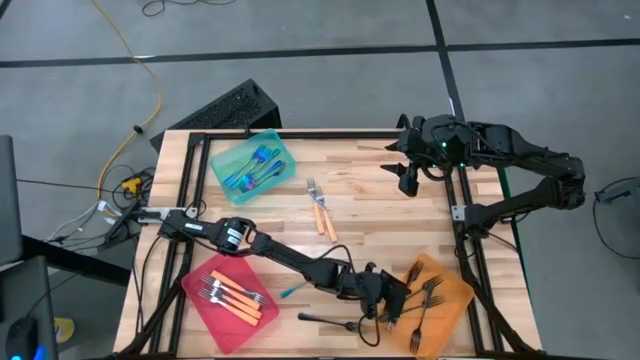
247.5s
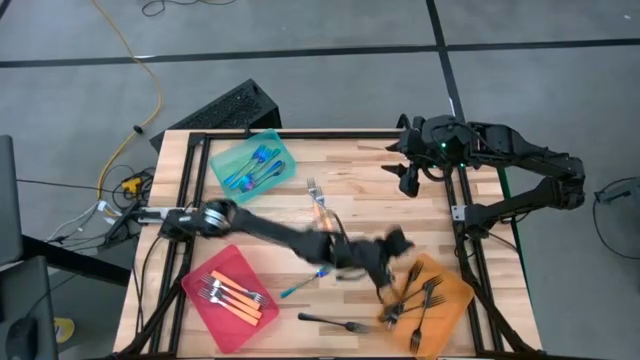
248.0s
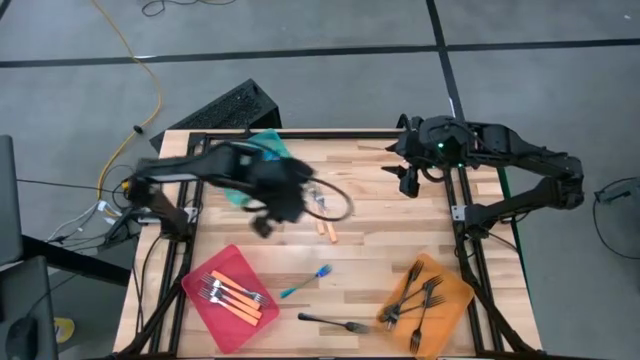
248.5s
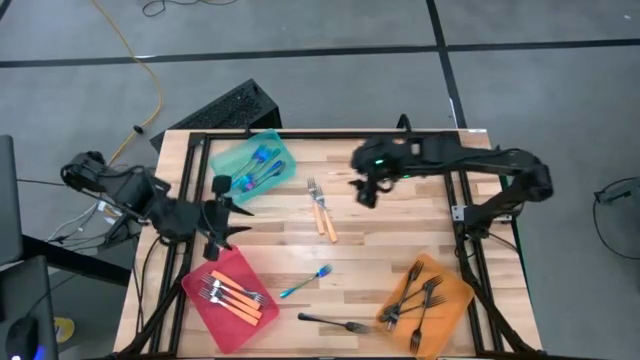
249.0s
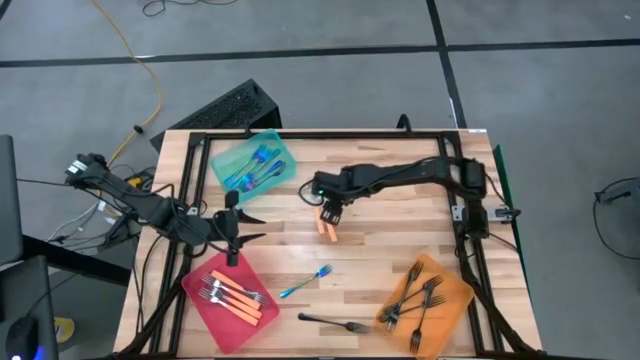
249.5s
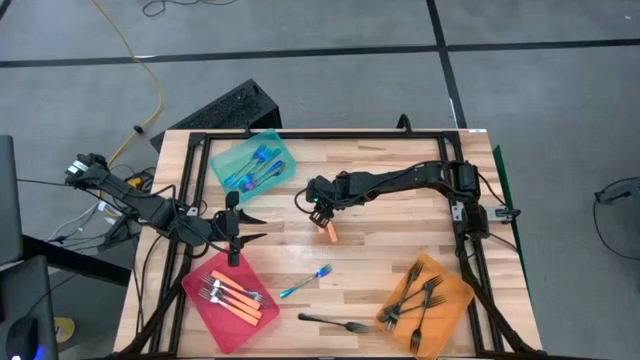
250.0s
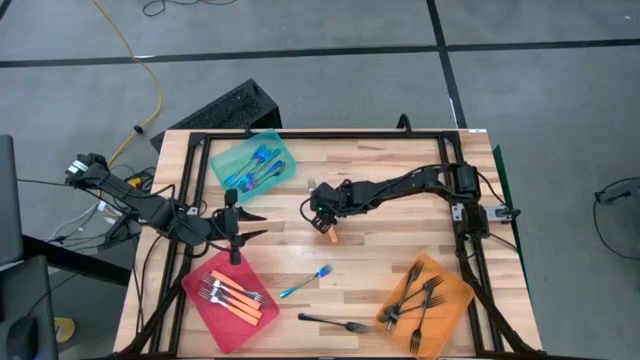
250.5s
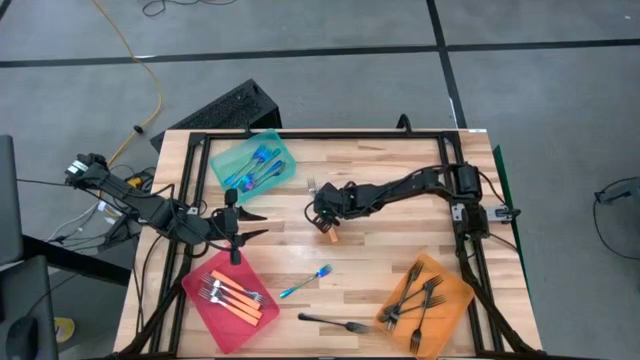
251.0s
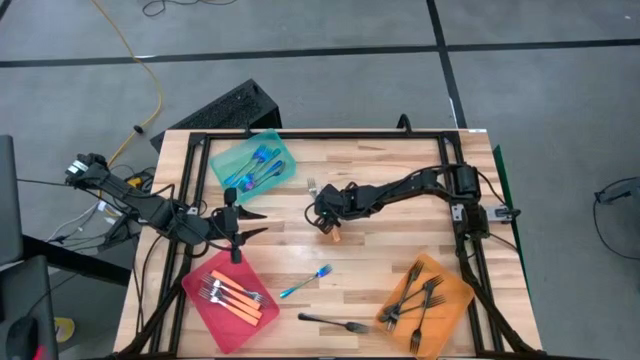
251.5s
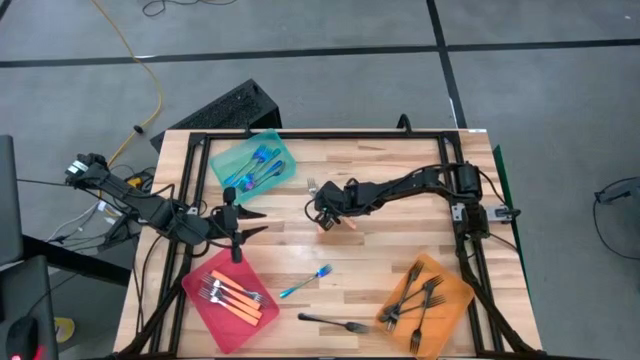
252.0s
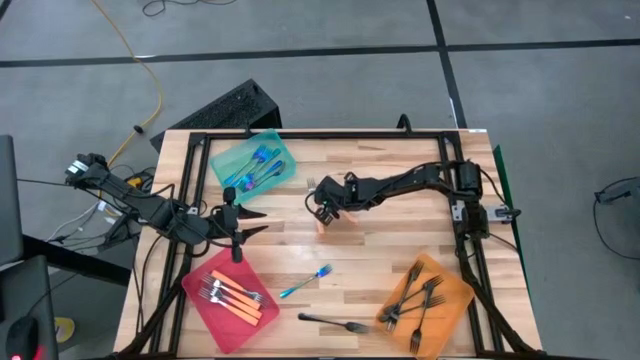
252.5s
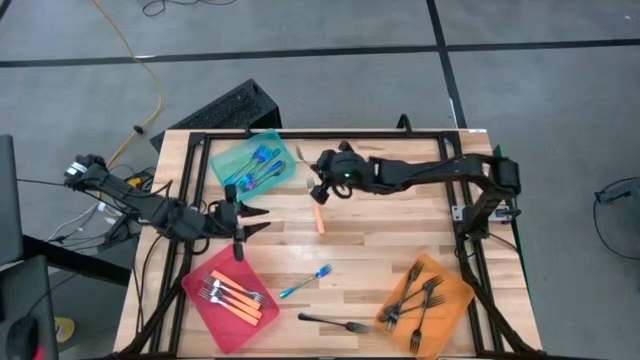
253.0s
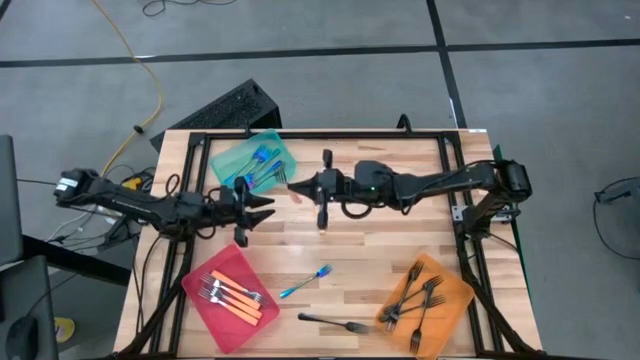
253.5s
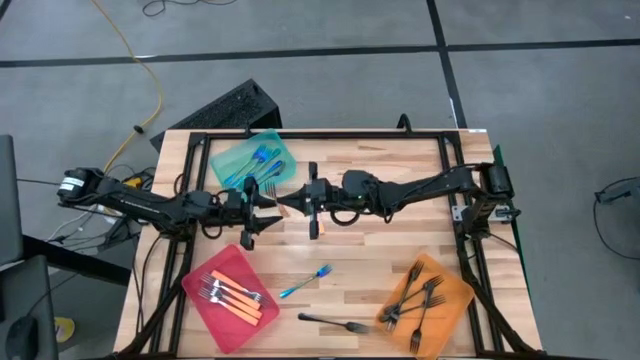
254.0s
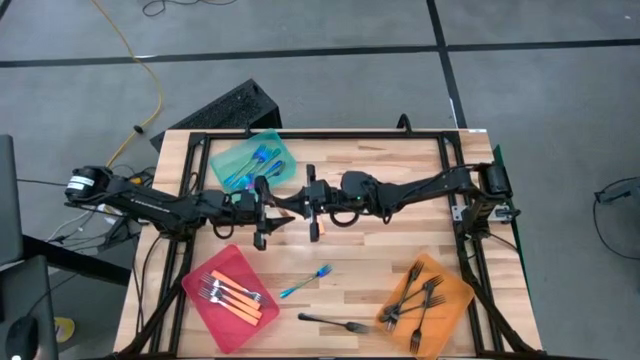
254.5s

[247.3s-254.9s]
Task: Sort silverware by color (type)
Put the orange fork into the red bin

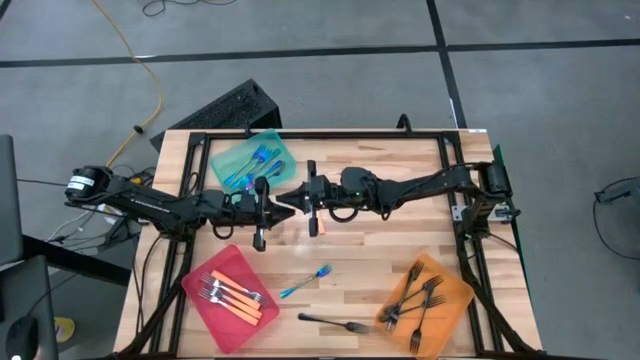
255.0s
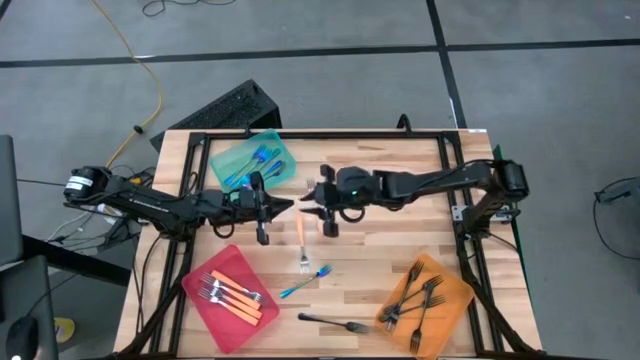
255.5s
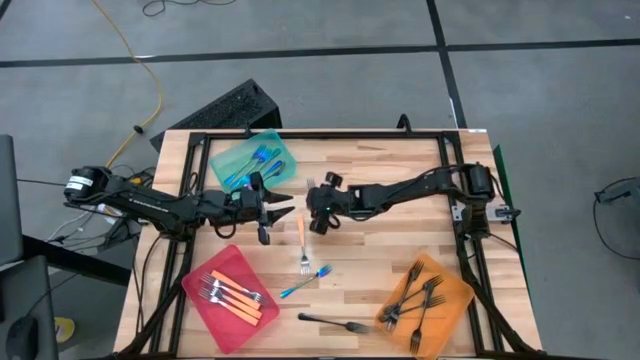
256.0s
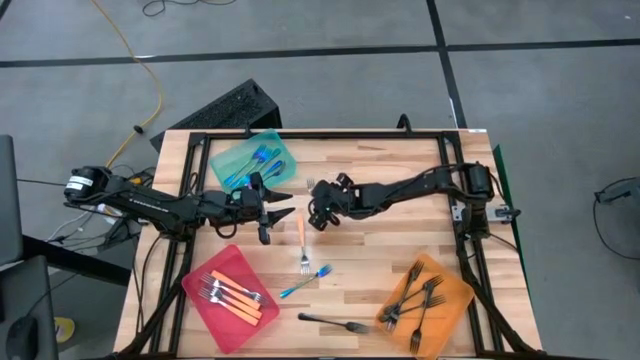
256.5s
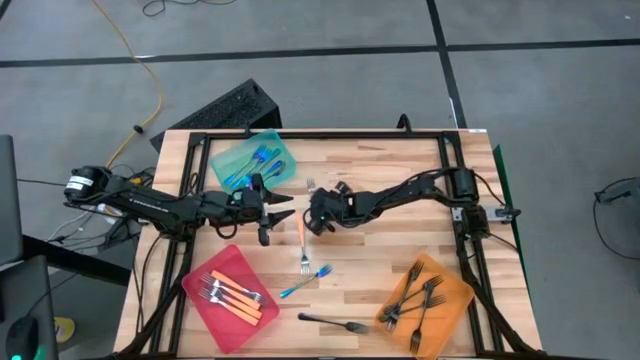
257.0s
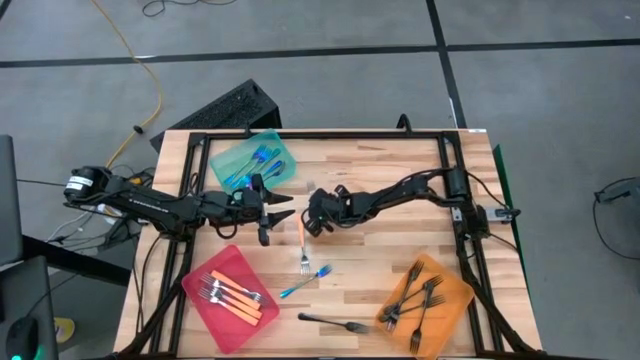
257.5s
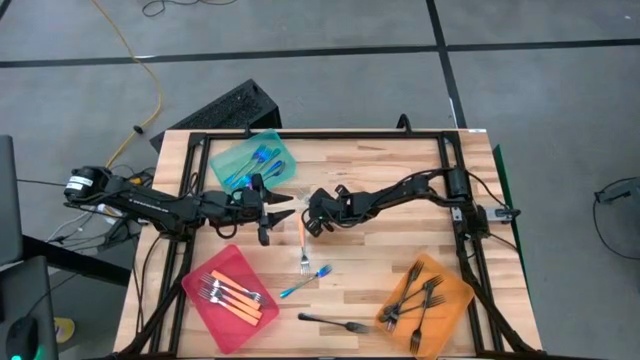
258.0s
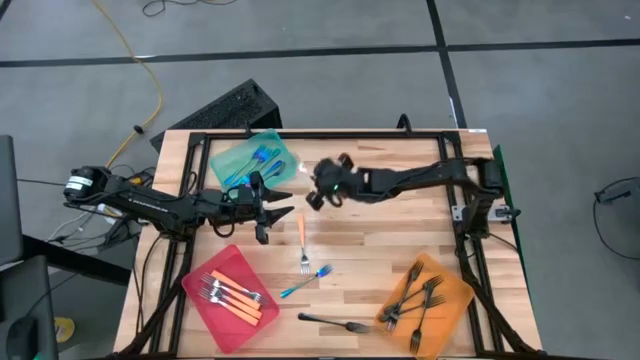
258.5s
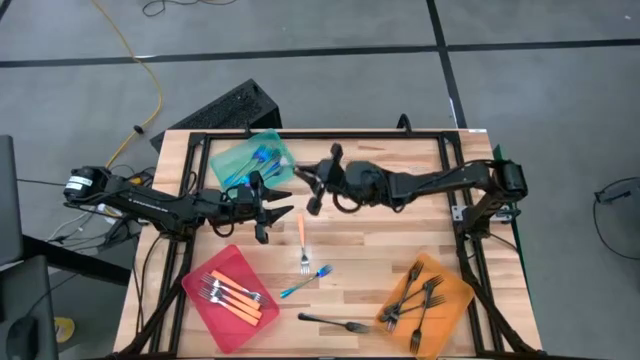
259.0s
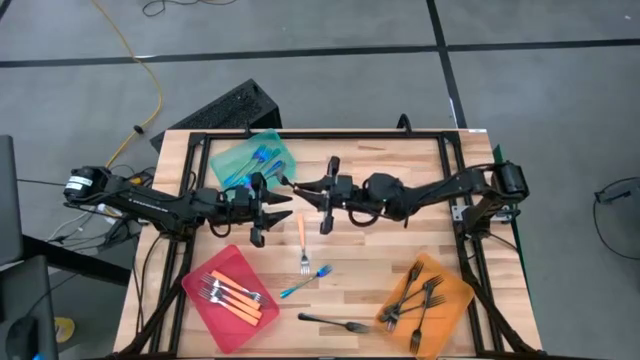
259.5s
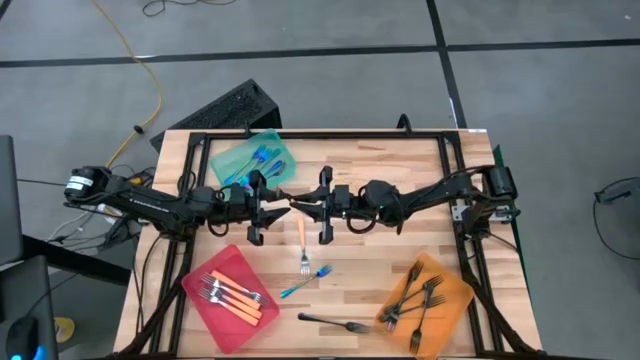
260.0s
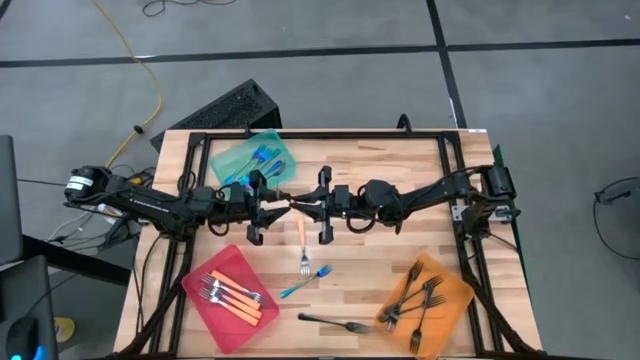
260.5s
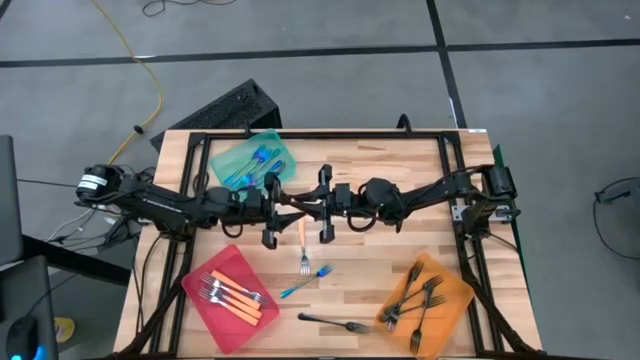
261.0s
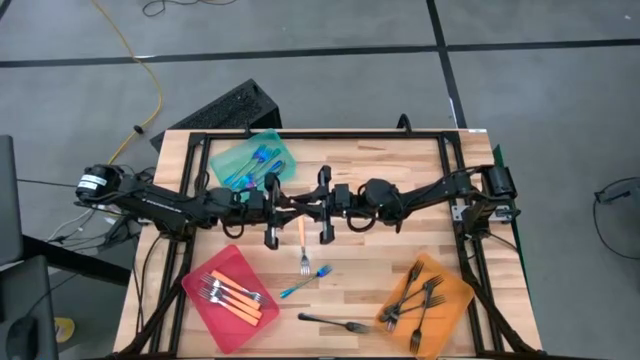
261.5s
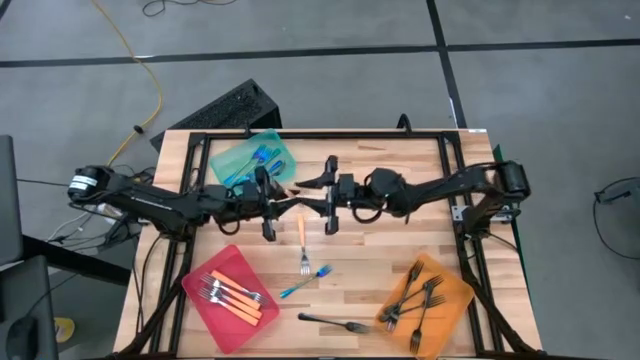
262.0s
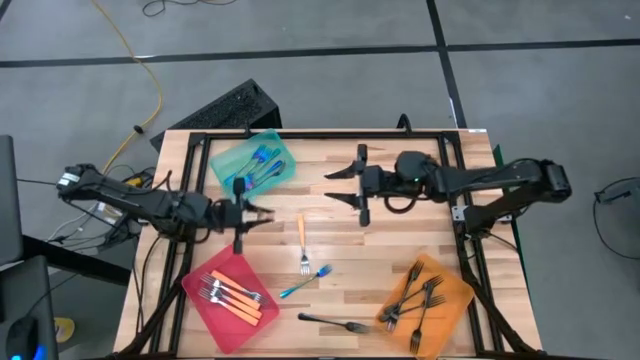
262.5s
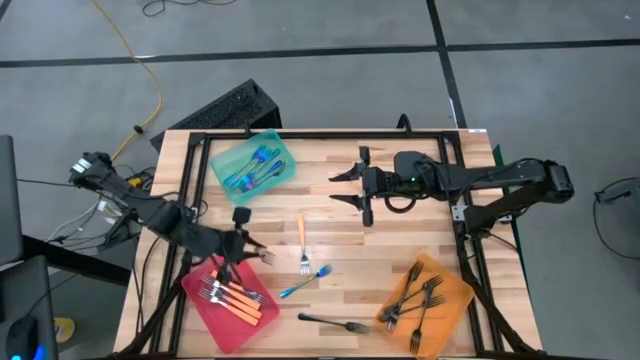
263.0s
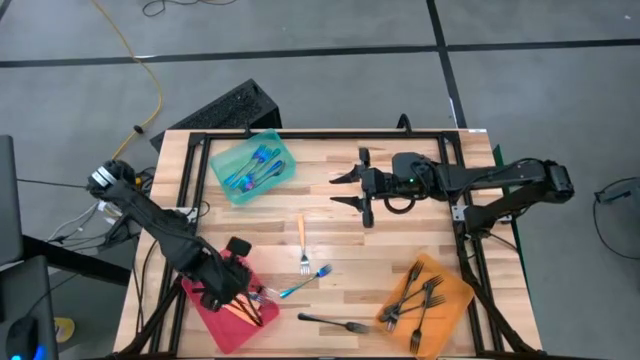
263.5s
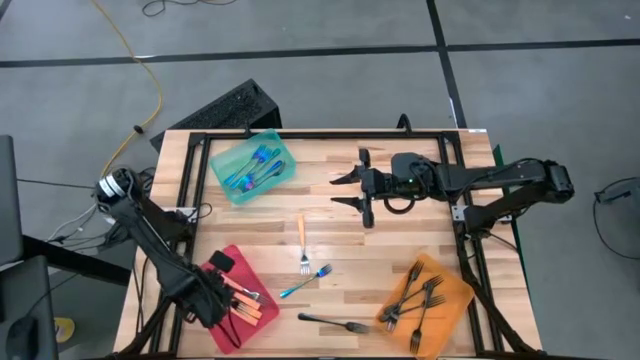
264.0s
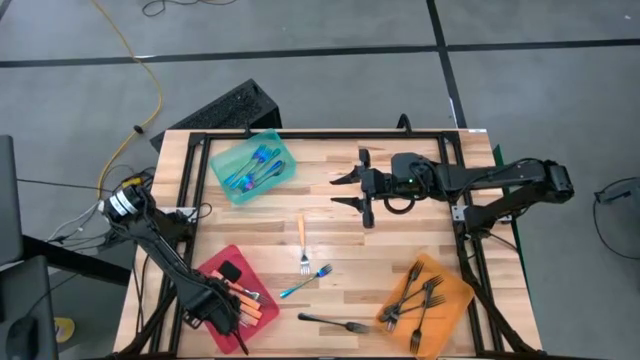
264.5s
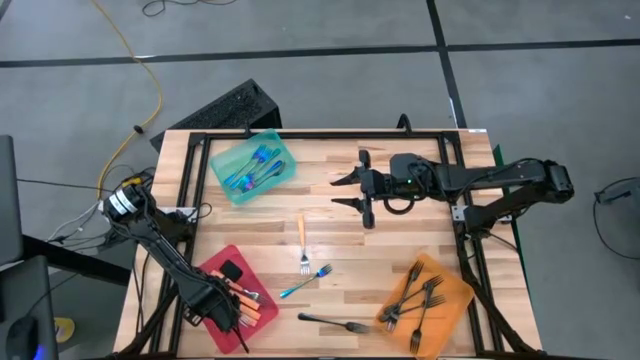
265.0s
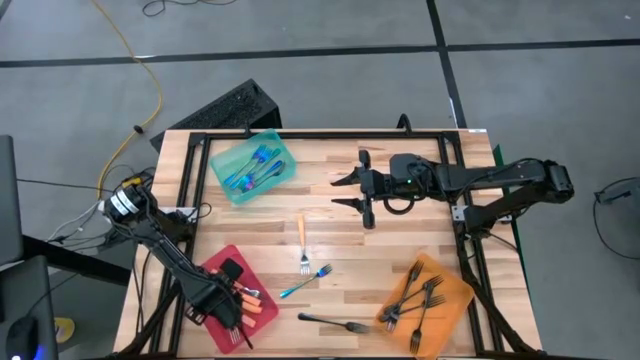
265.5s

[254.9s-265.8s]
Put the orange fork into the red bin
